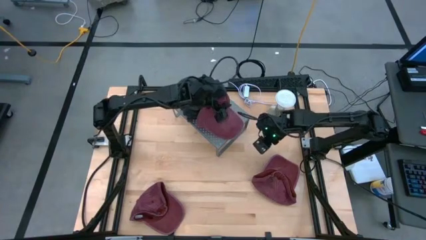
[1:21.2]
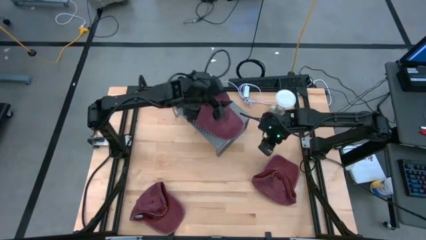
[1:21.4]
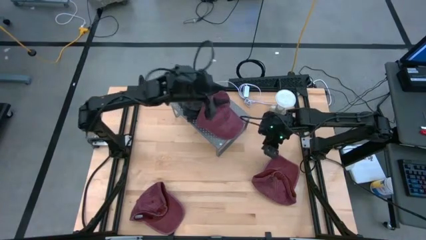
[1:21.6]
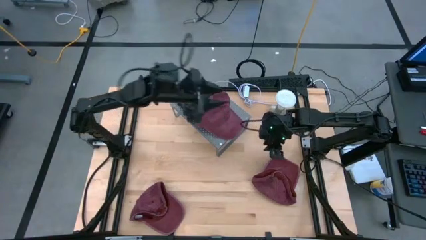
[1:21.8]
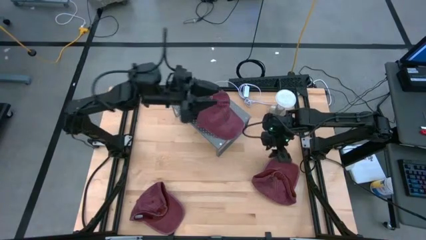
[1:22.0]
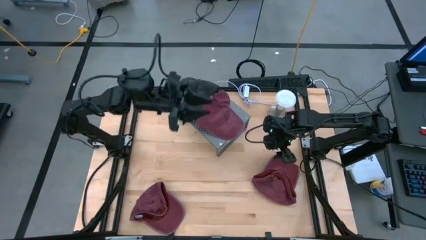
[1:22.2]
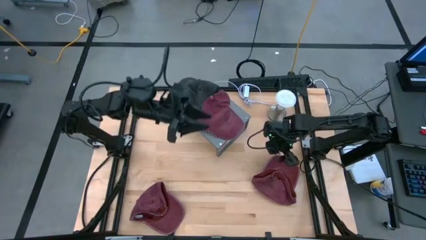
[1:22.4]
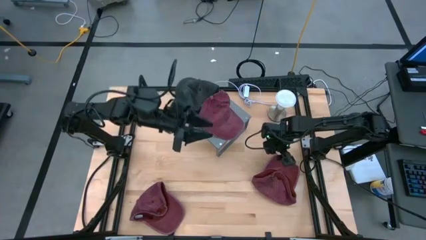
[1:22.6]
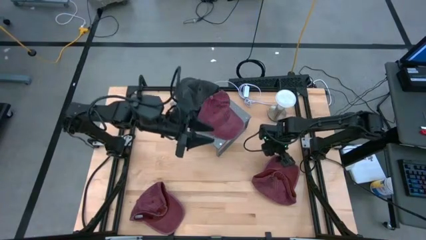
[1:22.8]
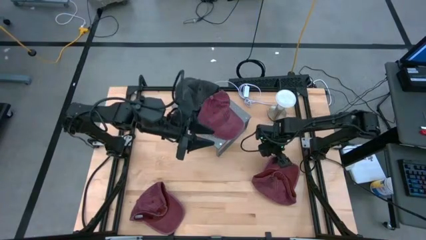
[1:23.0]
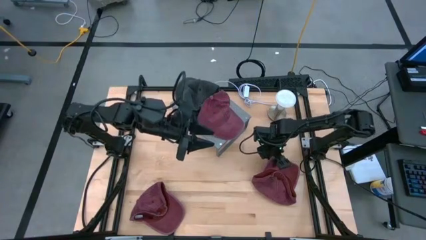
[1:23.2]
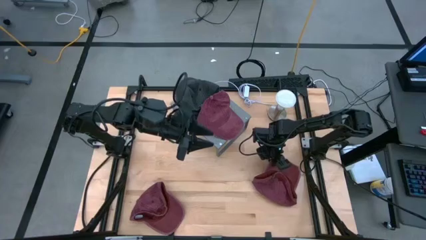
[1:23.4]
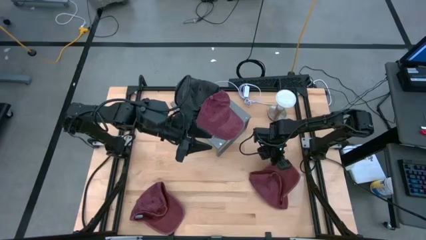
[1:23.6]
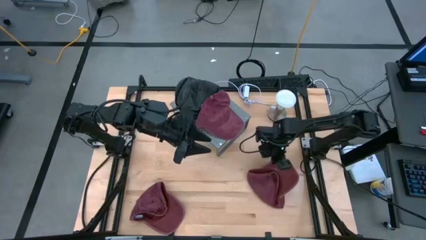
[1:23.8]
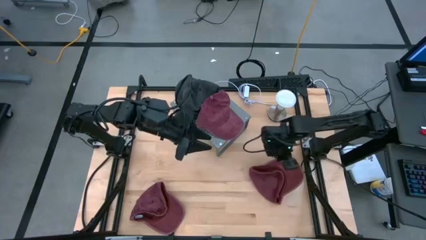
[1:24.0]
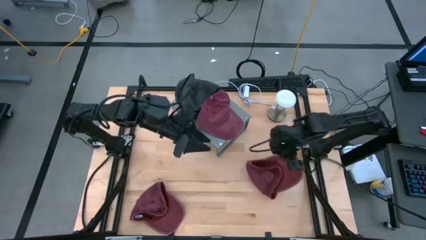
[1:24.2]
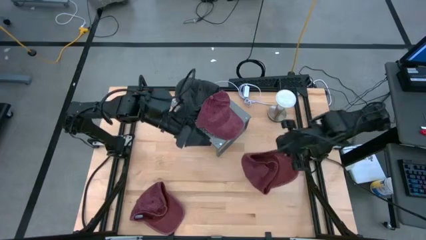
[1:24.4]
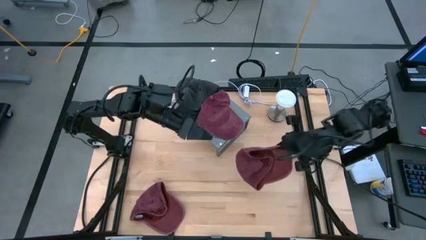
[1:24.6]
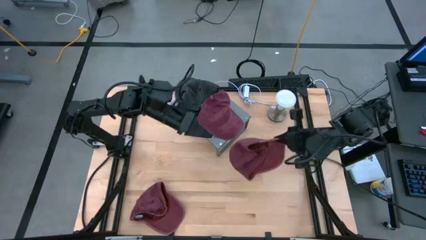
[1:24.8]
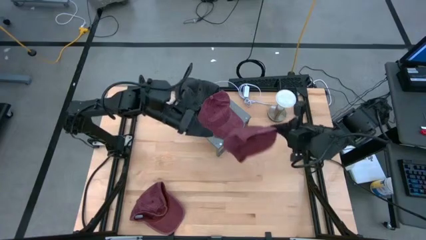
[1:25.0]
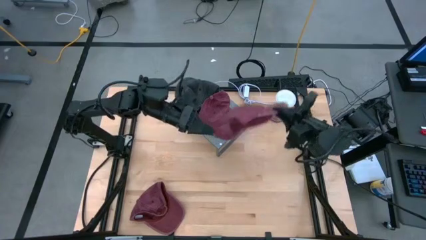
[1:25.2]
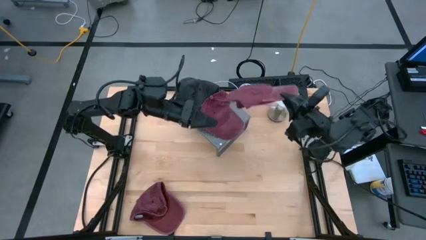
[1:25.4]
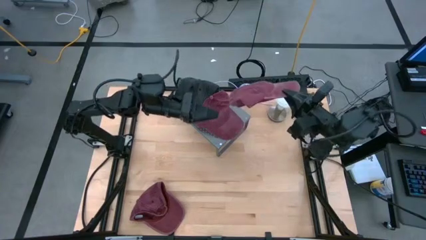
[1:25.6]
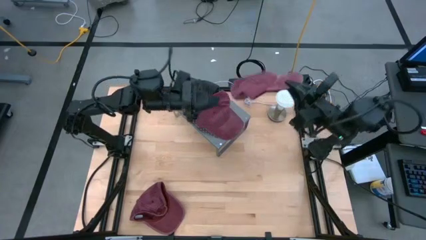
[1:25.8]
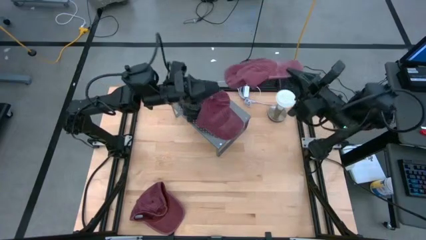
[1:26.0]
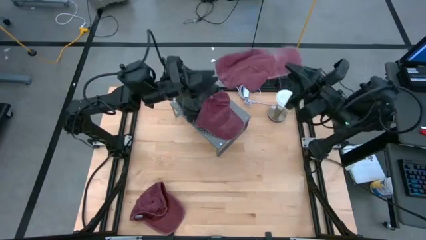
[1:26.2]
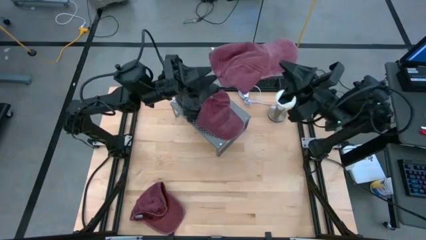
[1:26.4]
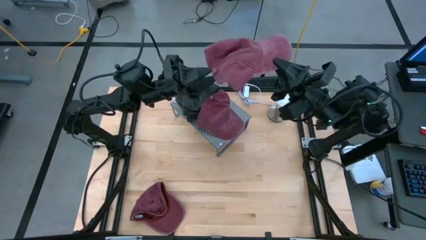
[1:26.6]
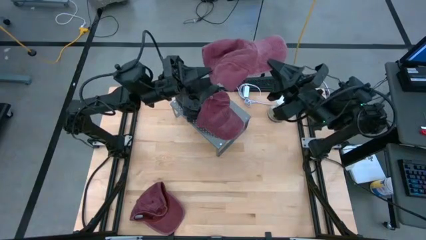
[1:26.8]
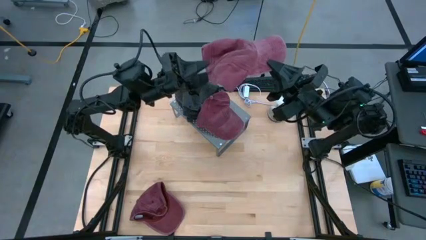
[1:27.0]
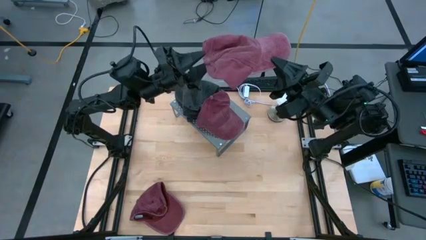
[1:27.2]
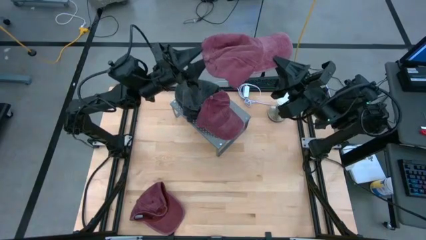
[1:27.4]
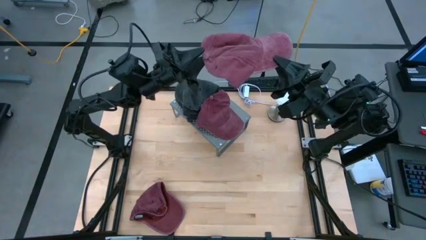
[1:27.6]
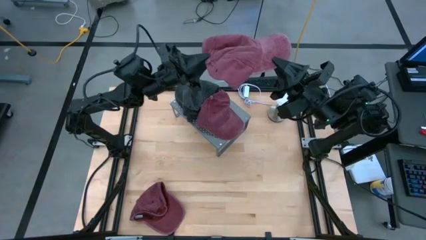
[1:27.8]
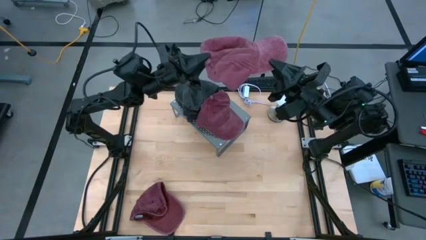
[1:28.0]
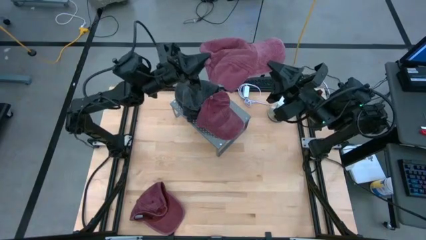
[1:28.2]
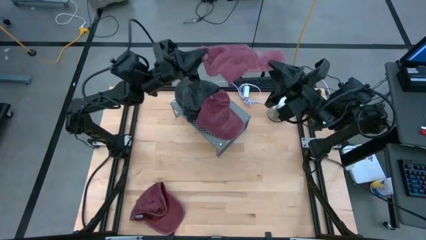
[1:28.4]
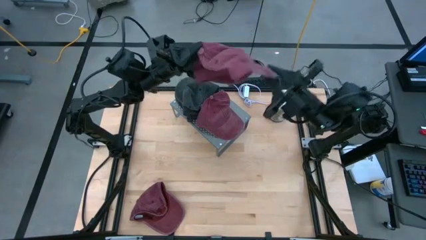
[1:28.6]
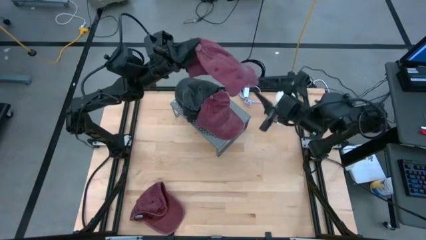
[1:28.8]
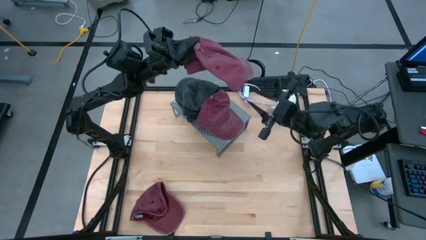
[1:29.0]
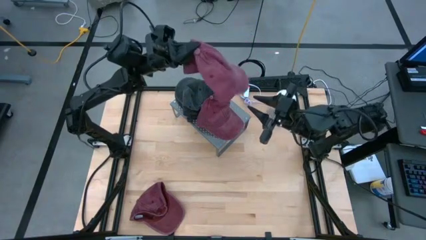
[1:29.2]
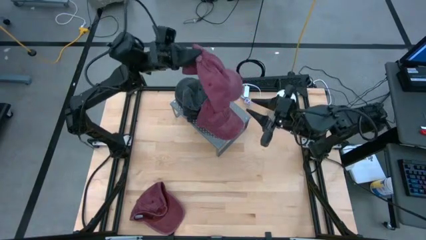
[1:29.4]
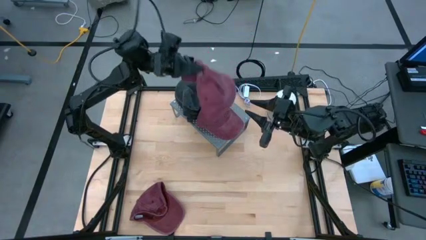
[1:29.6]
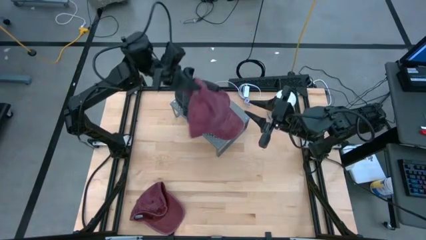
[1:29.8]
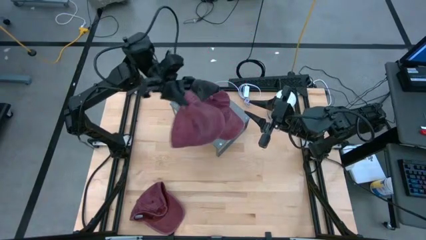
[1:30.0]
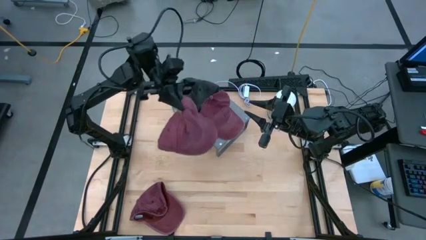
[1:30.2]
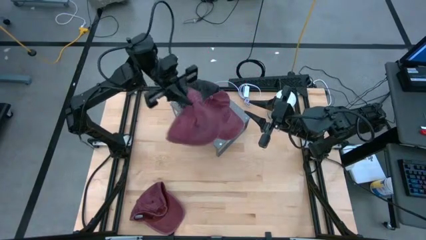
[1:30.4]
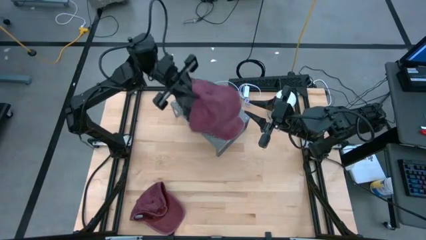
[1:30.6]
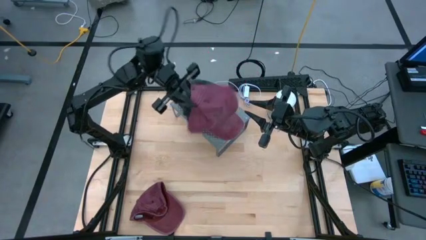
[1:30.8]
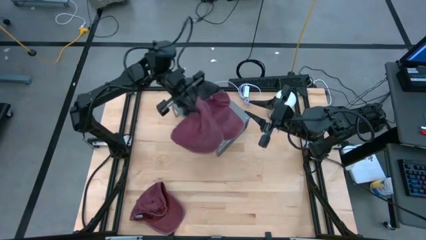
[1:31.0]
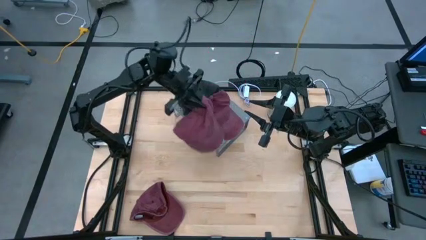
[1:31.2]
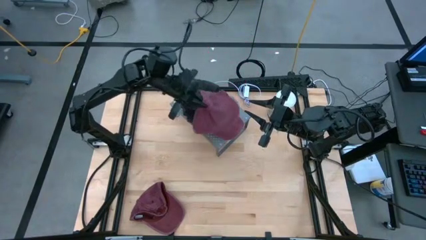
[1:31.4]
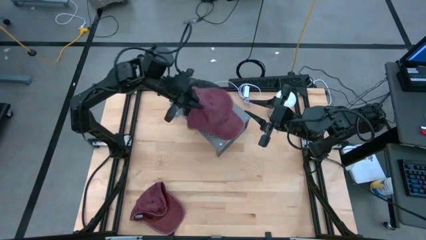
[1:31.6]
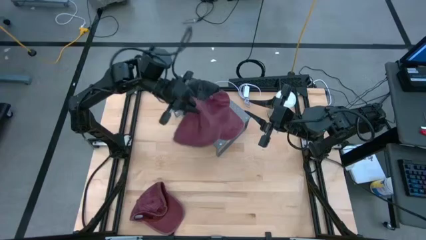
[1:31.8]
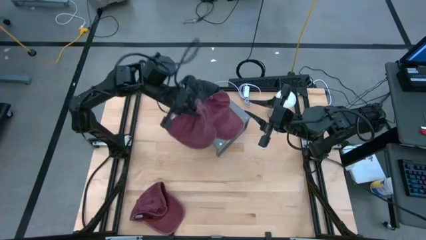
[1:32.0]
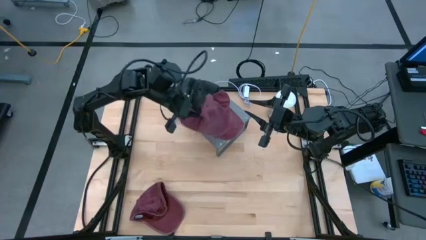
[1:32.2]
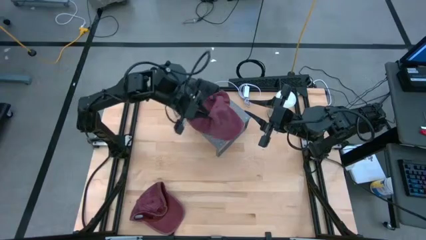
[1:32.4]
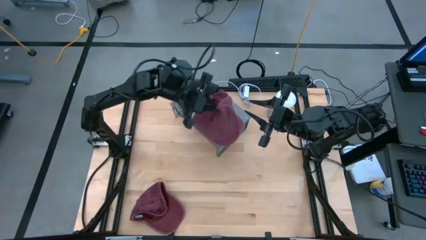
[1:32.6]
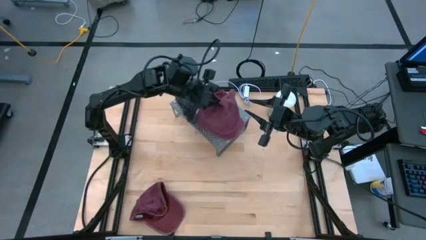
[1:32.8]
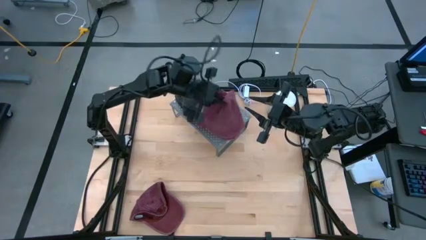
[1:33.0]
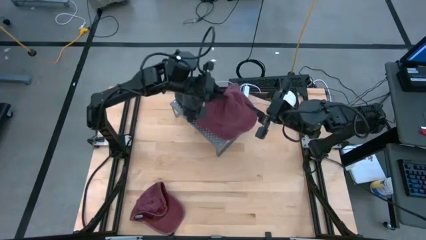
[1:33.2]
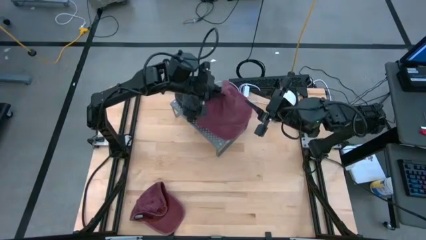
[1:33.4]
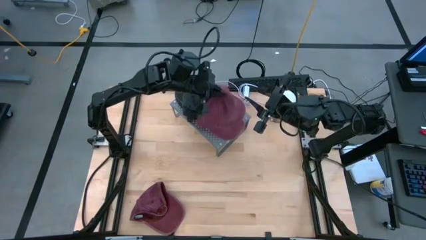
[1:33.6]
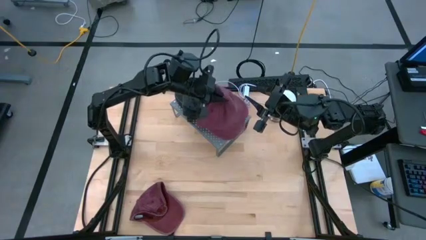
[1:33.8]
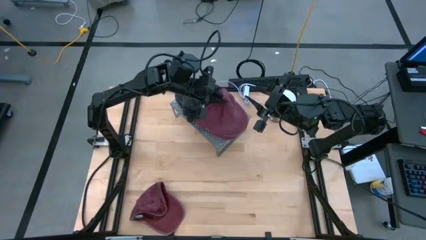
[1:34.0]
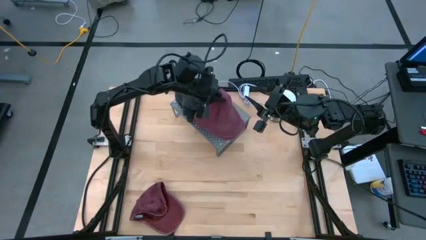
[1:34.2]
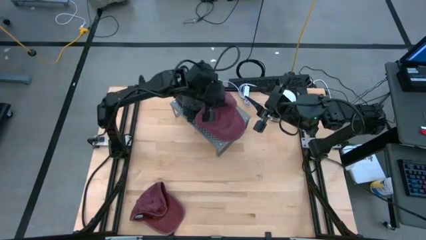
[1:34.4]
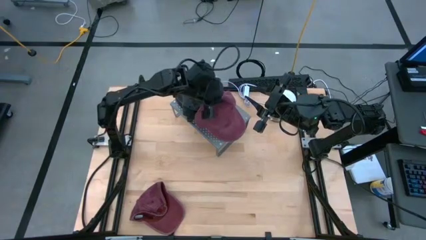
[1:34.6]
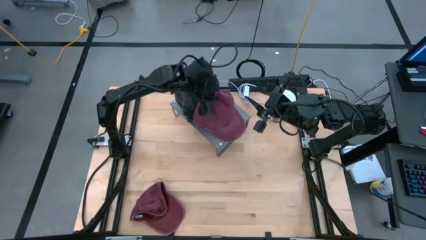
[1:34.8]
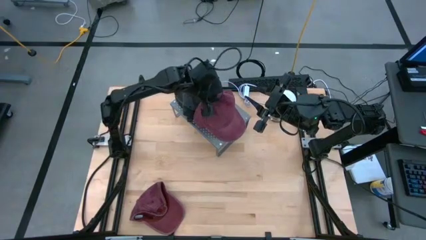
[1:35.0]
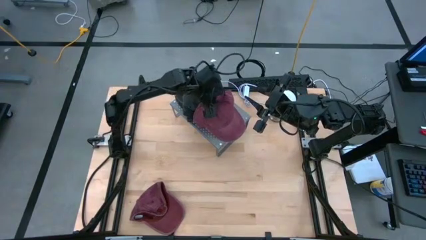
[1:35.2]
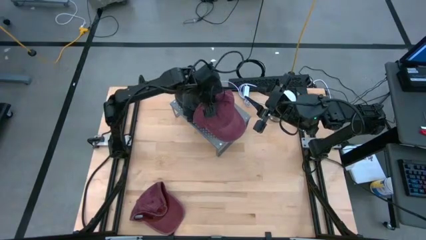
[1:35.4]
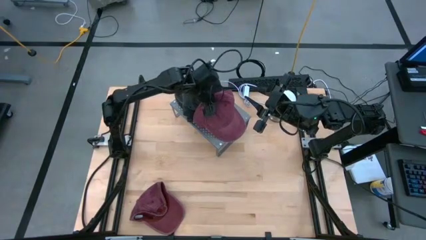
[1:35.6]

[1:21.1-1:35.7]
Task: Pick & Place hat
Stack the top red cap on the red cap on the shelf

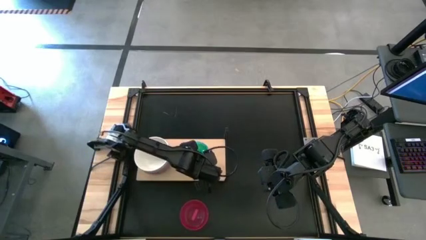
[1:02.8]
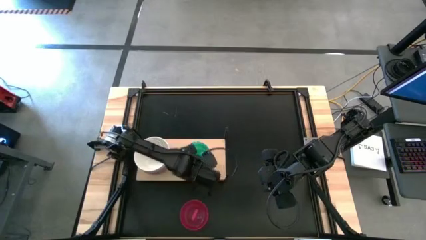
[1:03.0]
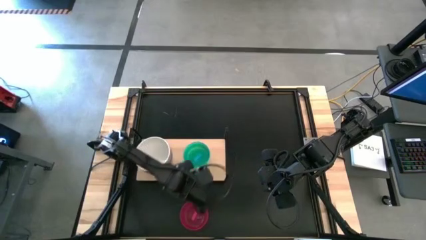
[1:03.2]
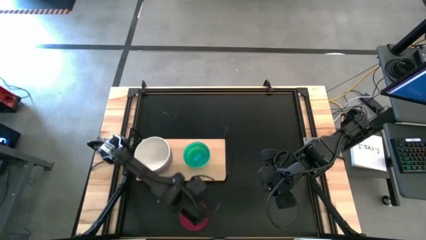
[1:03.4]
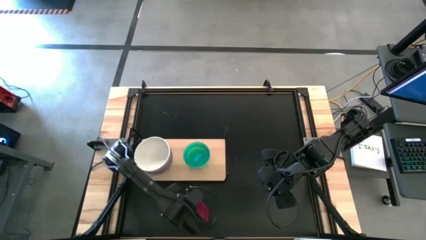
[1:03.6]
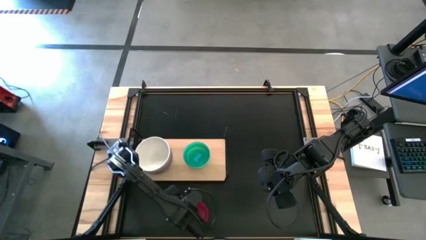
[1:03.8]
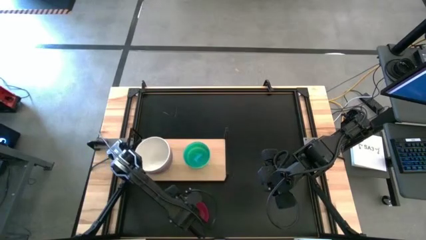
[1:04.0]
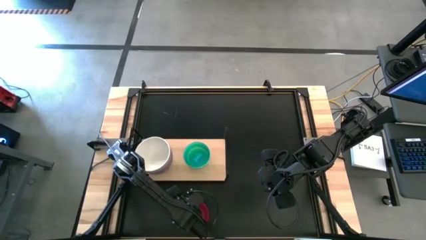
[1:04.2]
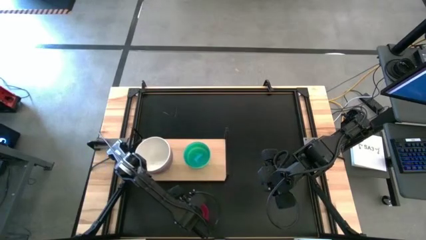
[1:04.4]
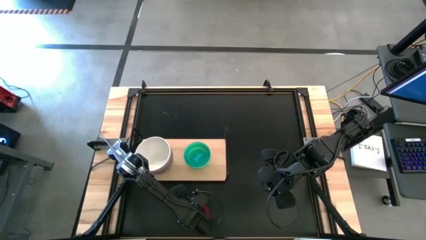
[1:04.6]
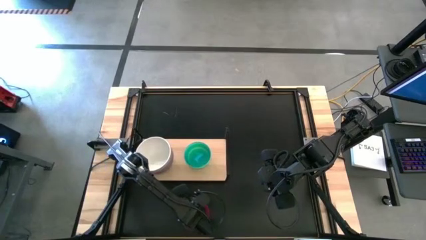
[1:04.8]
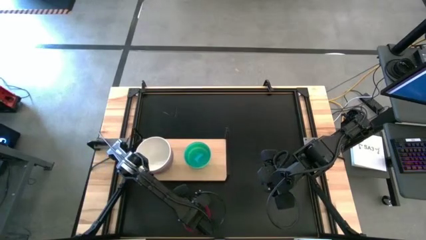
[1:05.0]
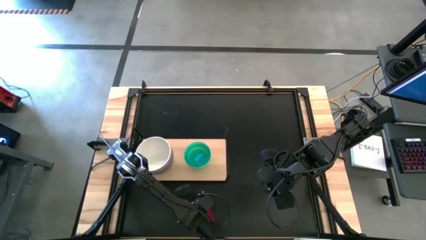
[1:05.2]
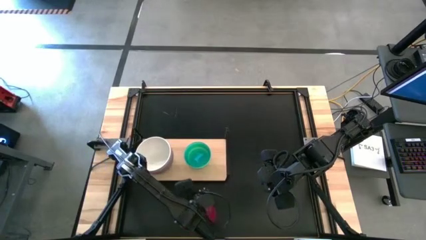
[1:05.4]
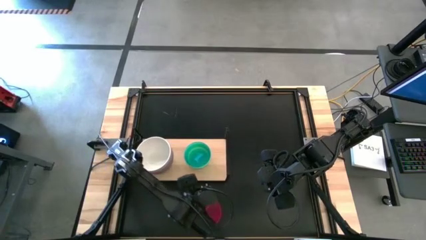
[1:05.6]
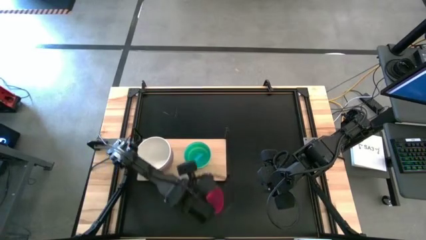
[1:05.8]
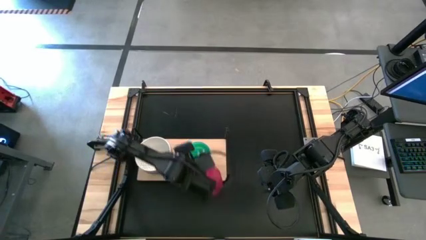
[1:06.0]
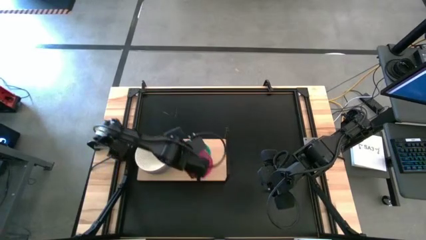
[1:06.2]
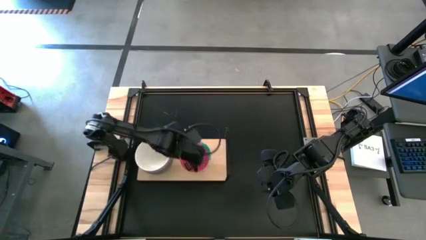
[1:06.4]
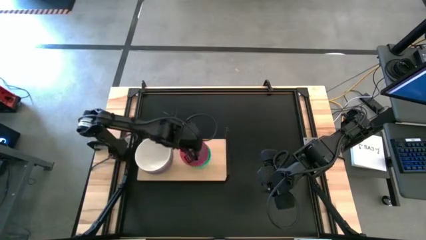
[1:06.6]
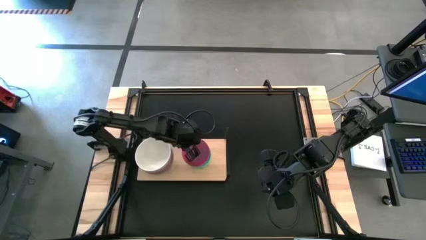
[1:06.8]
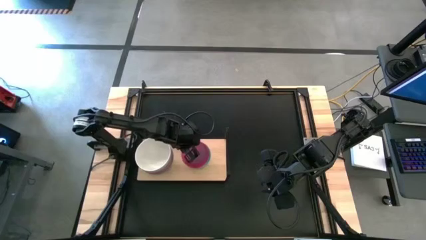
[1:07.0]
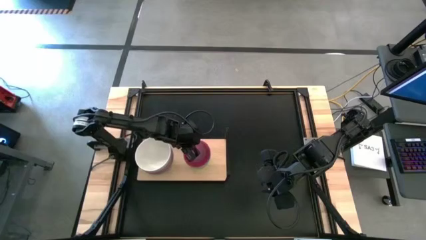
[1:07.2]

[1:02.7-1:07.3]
Task: Place and stack bowls onto a shelf
Stack the red bowl on top of the small blue bowl on the shelf
